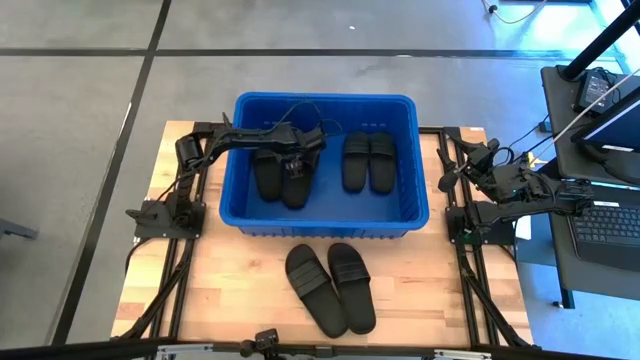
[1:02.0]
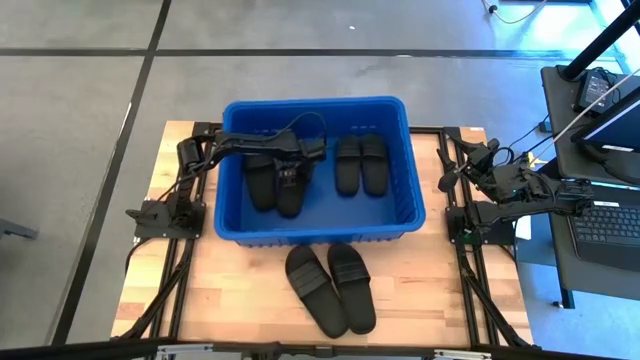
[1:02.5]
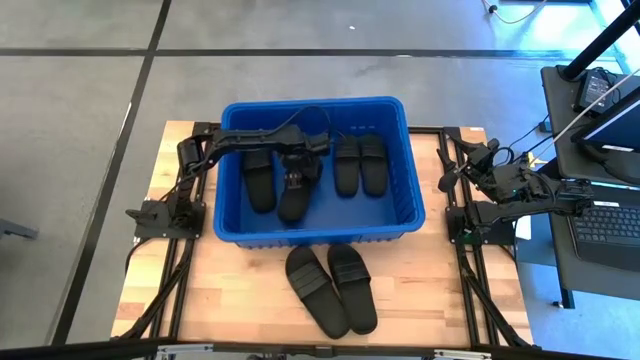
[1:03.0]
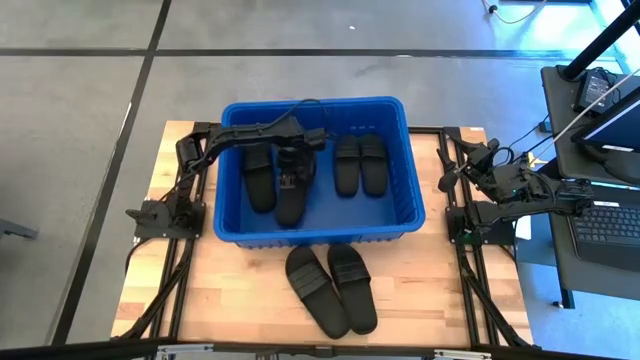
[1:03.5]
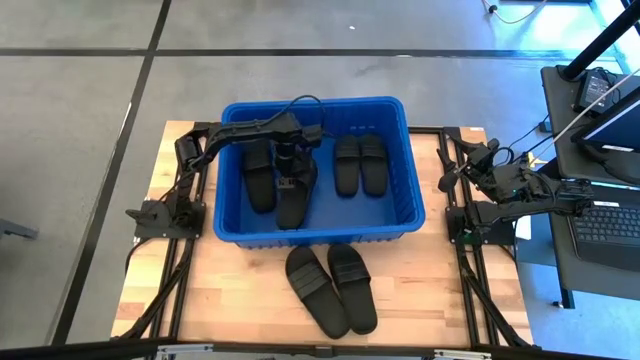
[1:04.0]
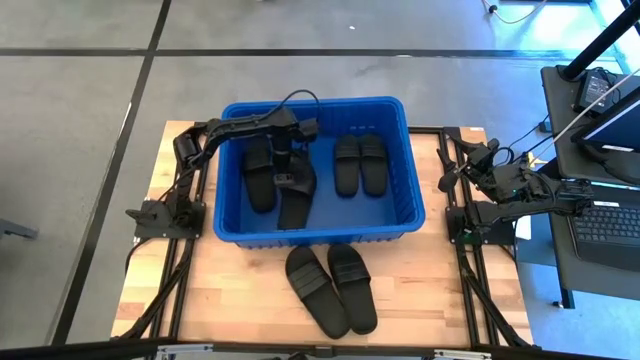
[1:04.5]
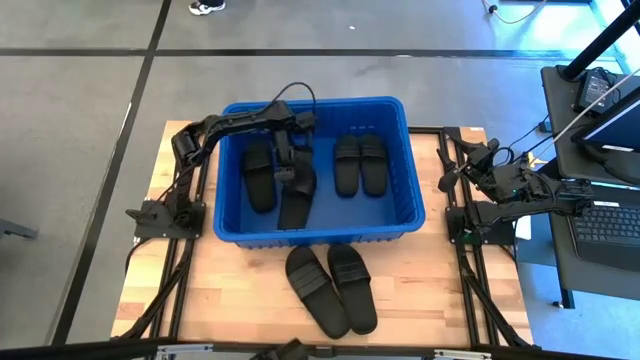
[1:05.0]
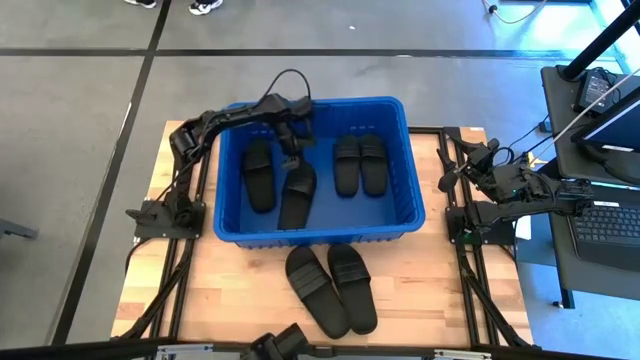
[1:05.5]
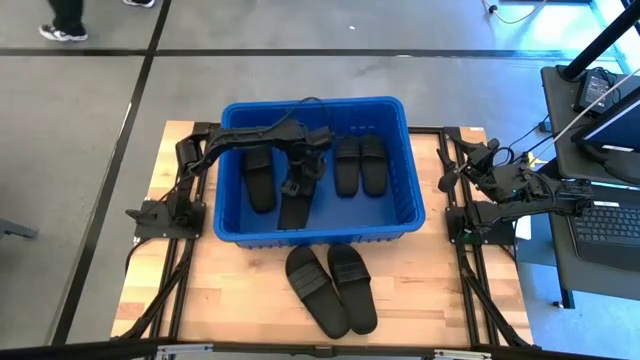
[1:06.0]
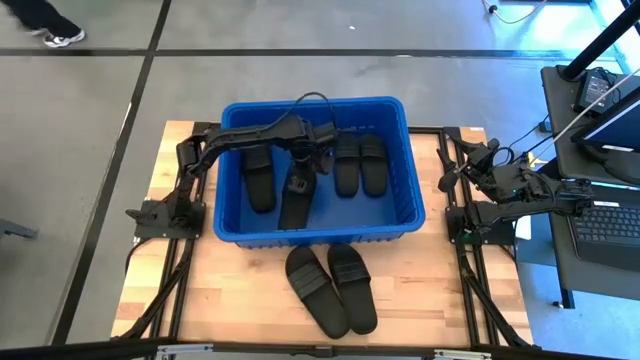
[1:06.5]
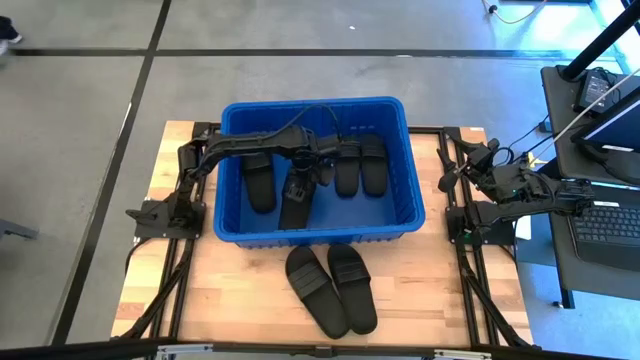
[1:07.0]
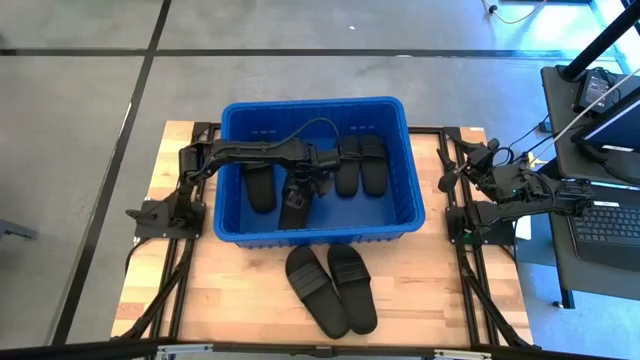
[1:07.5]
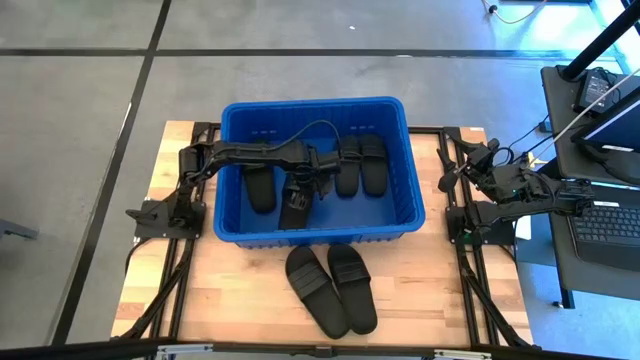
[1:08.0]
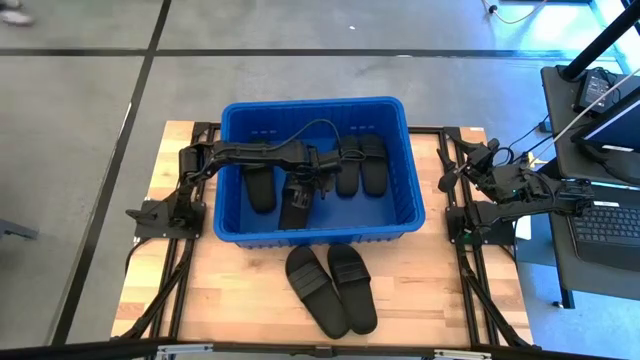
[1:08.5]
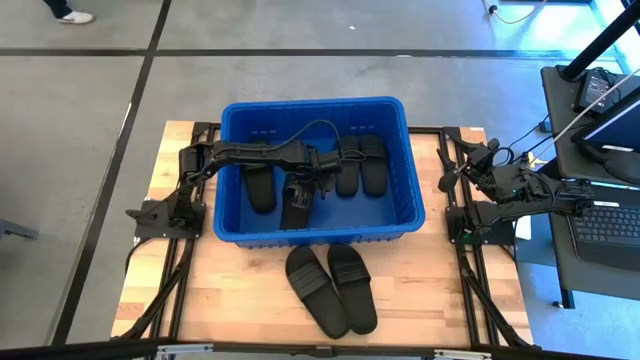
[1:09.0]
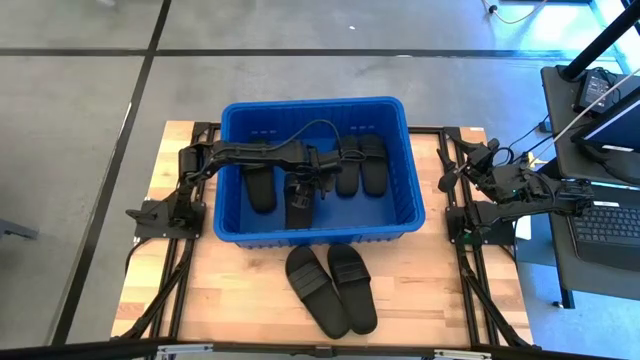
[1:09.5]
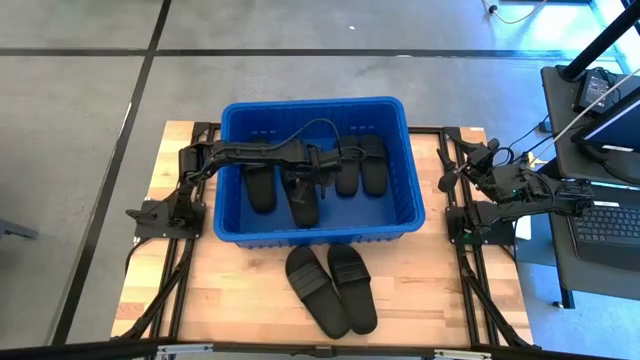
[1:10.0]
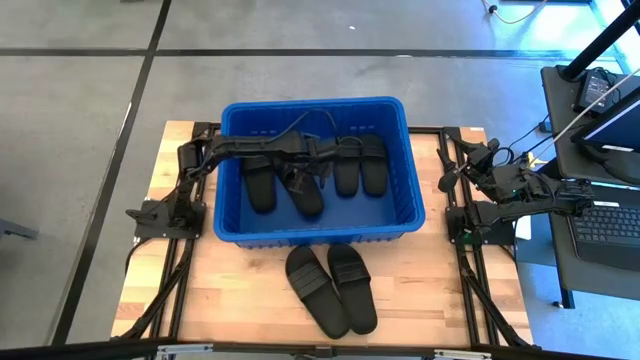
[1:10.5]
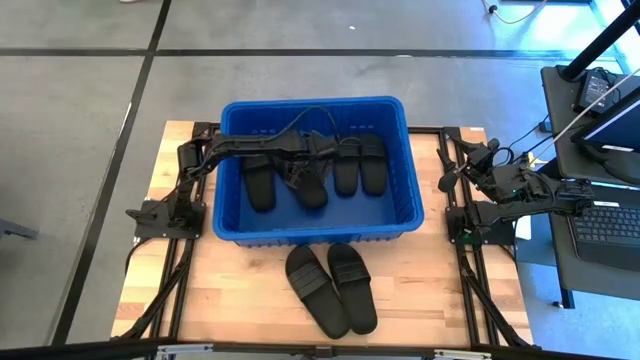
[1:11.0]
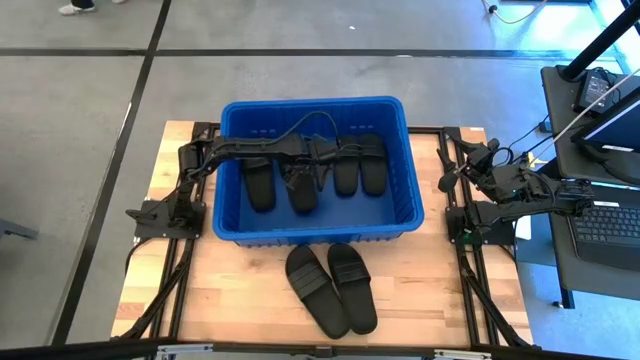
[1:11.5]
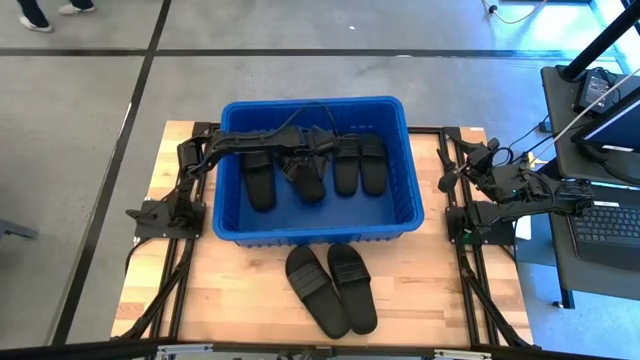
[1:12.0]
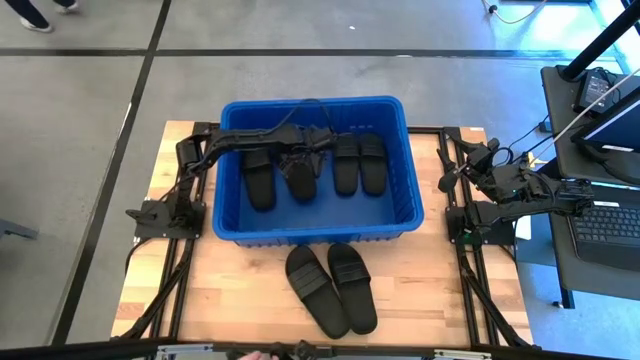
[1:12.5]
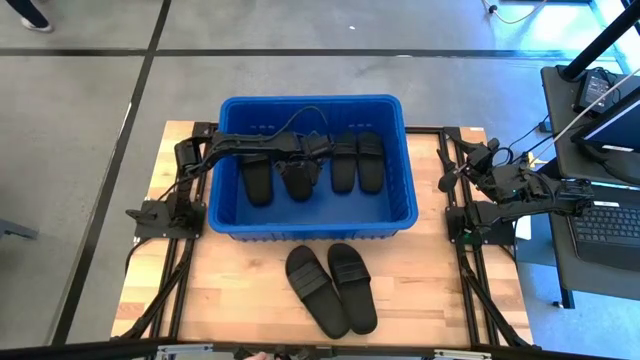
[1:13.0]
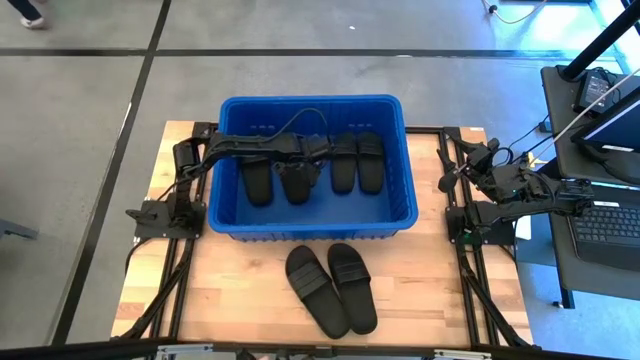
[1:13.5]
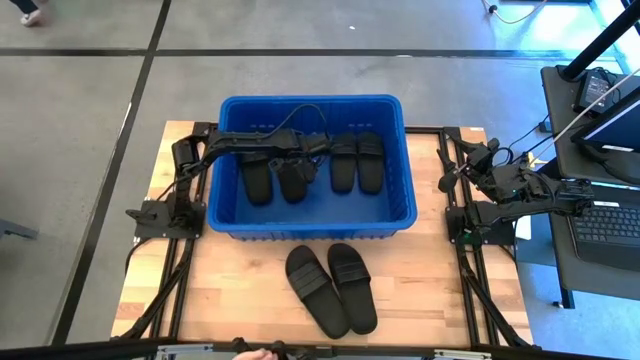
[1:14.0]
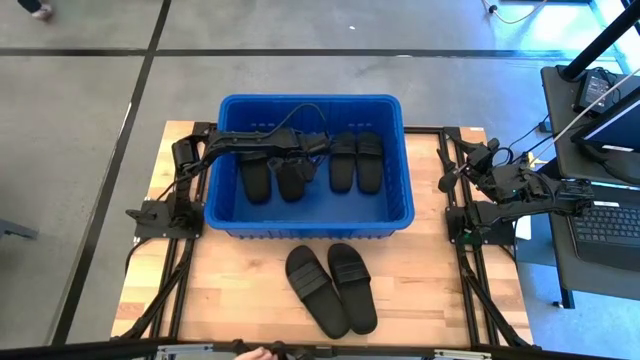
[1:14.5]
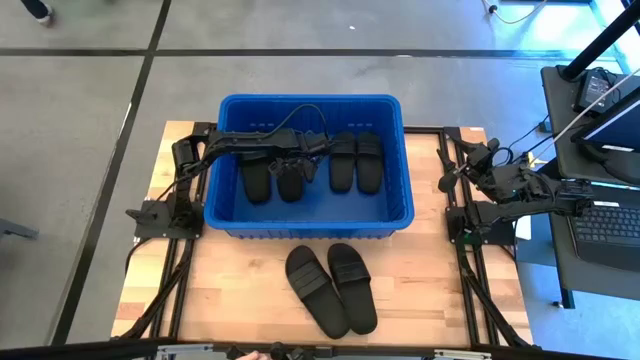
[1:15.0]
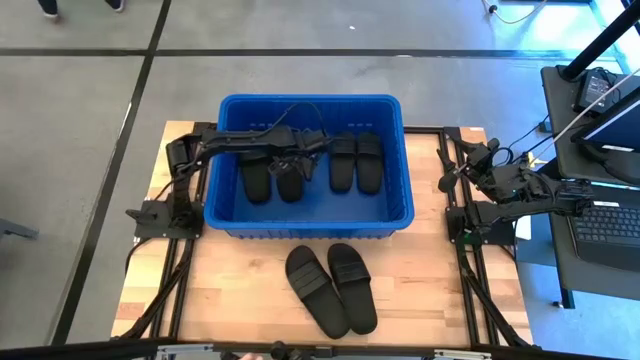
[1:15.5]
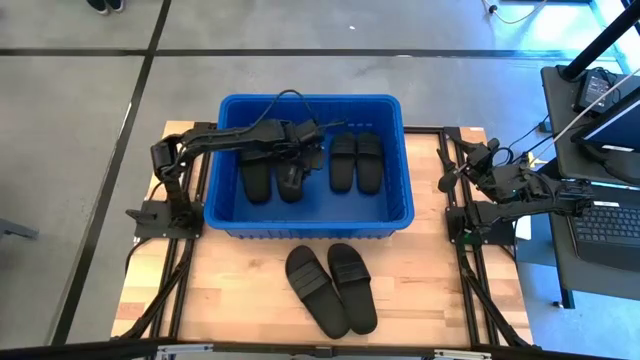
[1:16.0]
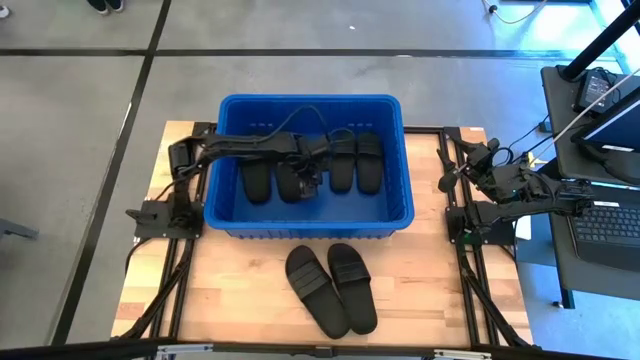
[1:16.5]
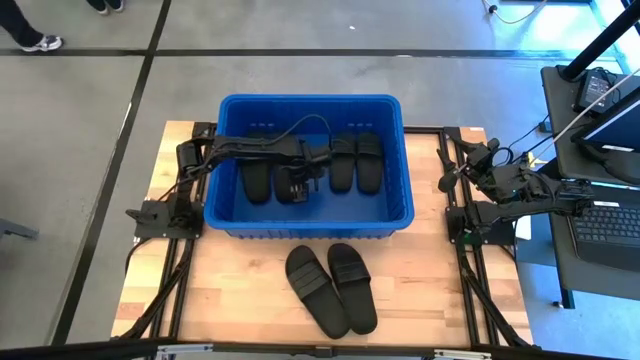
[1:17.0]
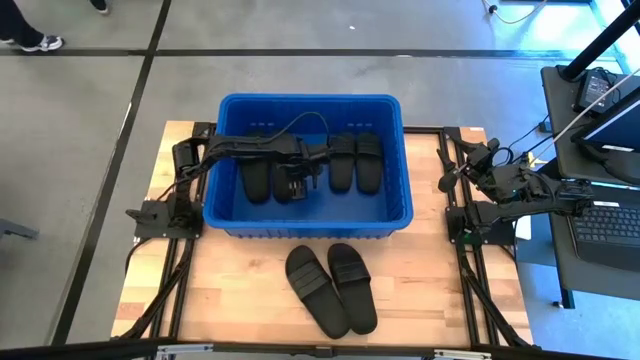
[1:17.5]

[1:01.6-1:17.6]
Task: Pick and place slides into bin
Put the black slide into the blue organizer bin

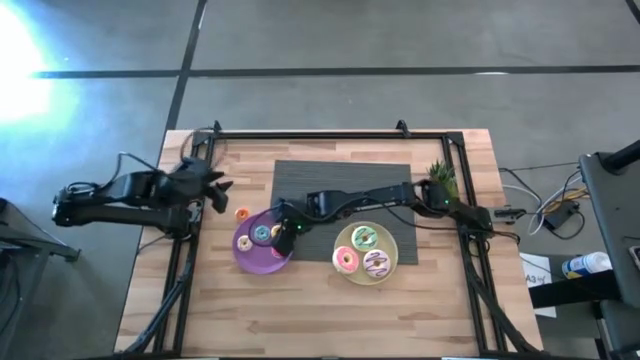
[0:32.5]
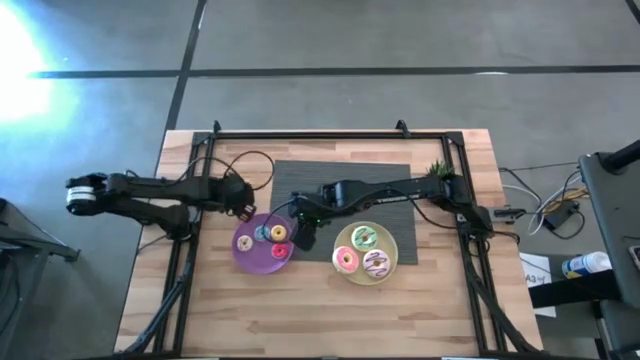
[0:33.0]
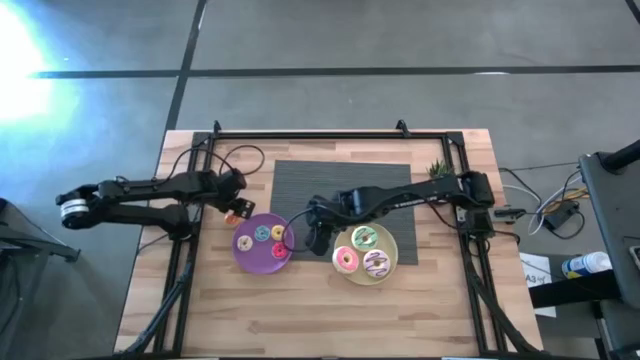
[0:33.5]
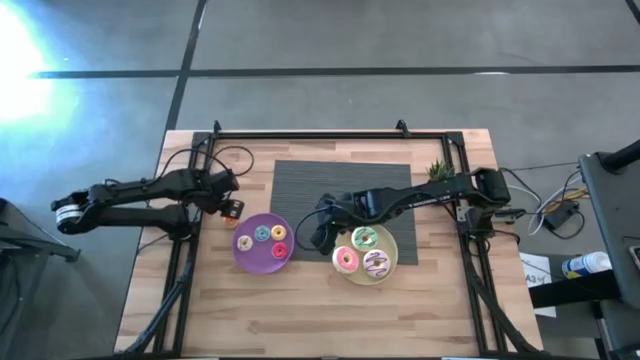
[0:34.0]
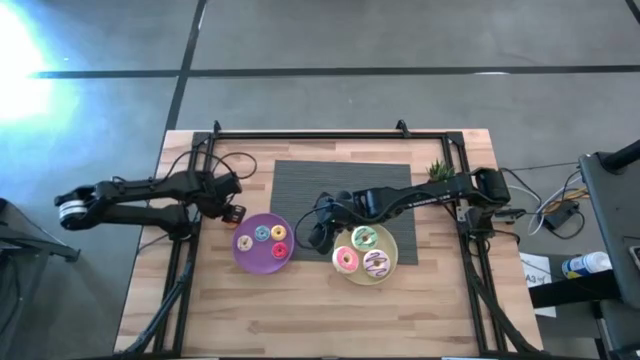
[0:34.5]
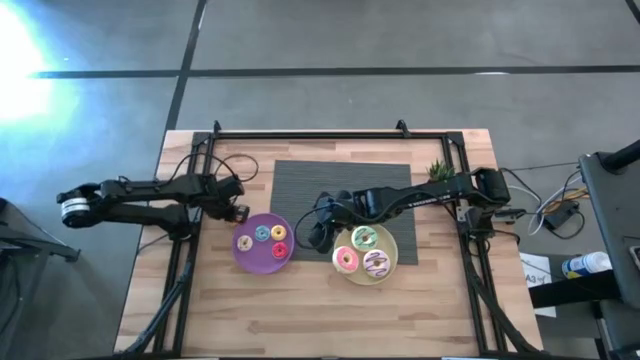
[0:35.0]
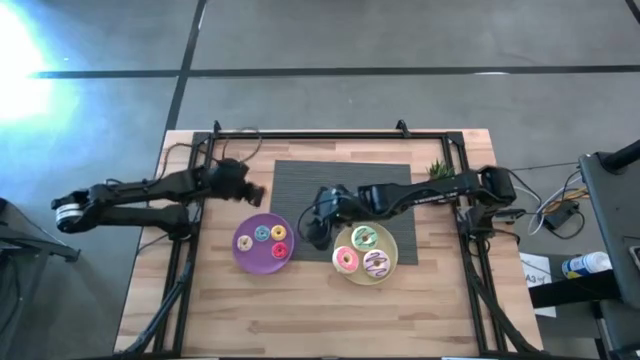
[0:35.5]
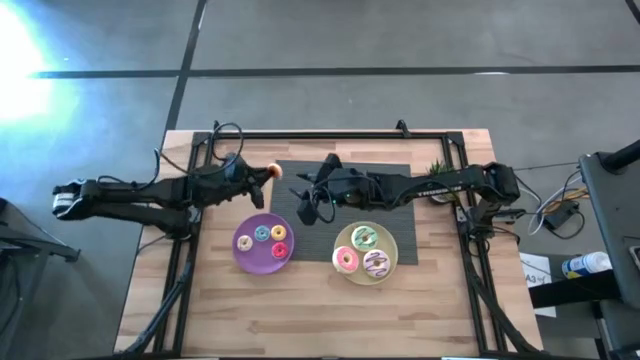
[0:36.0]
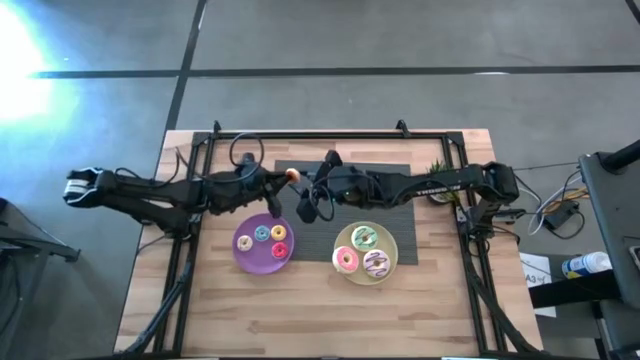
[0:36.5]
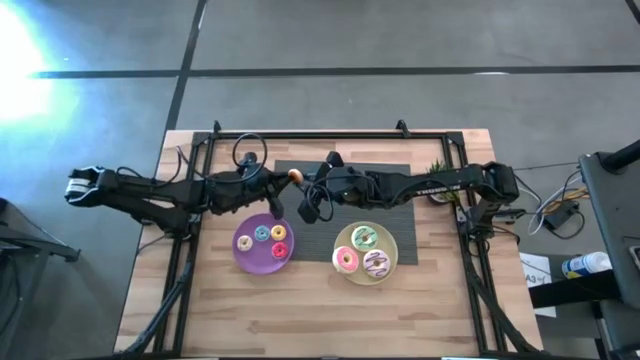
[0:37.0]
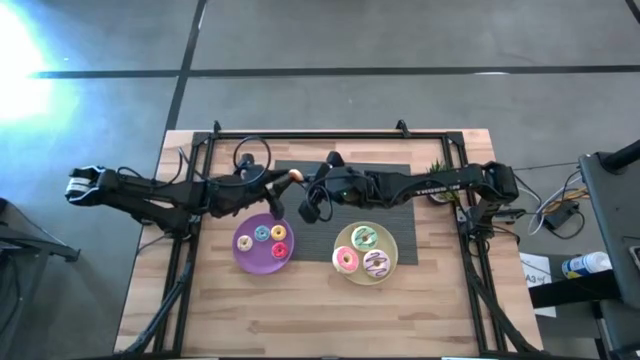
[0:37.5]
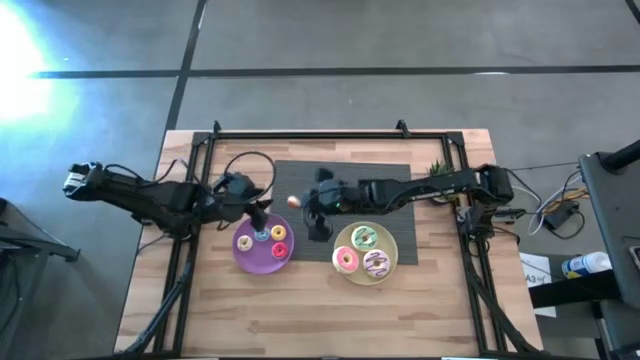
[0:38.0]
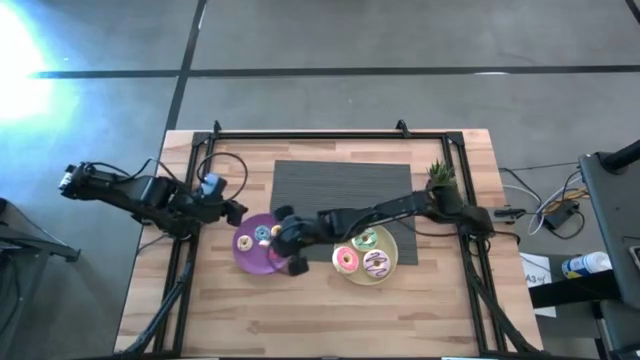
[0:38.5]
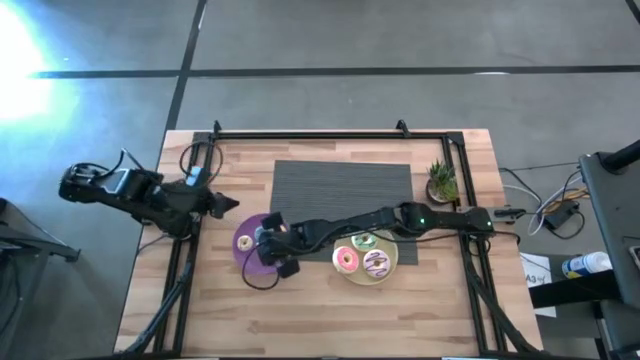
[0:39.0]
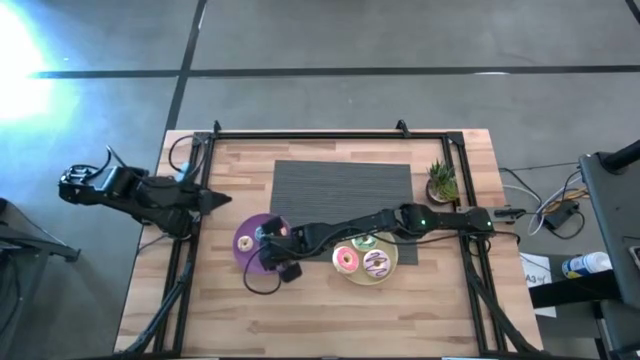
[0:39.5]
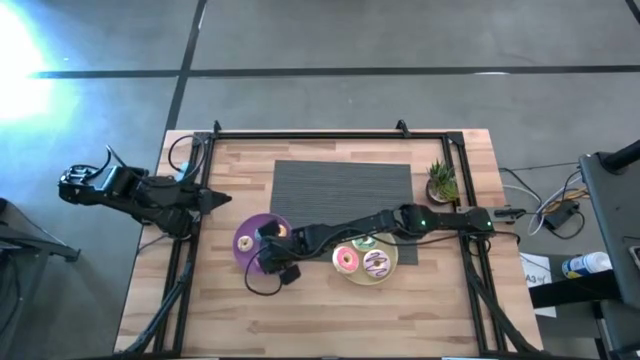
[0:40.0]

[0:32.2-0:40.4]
Task: Pick & Place donuts
Put the small orange donut on the violet plate
